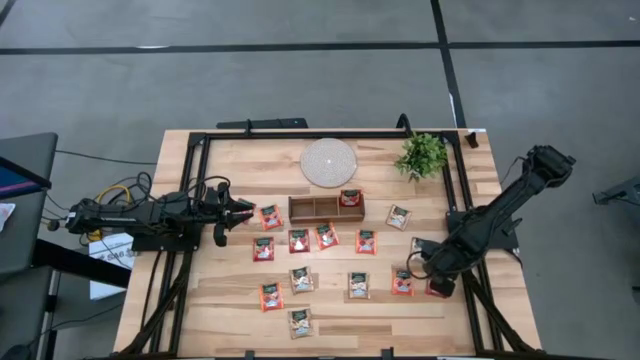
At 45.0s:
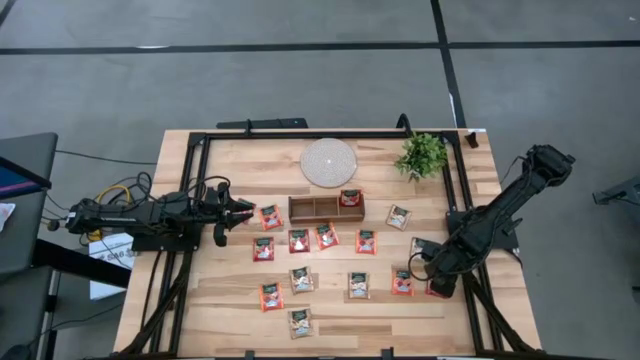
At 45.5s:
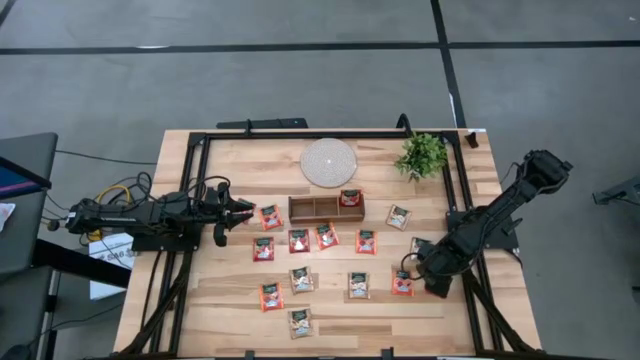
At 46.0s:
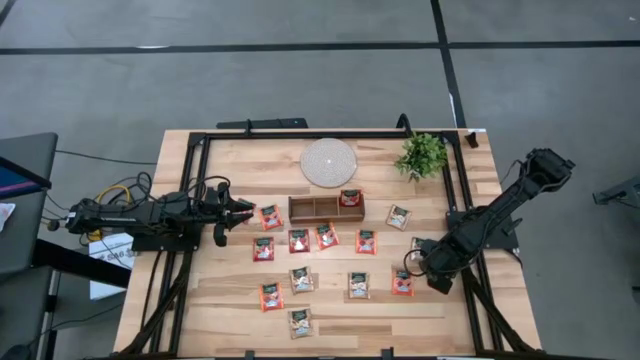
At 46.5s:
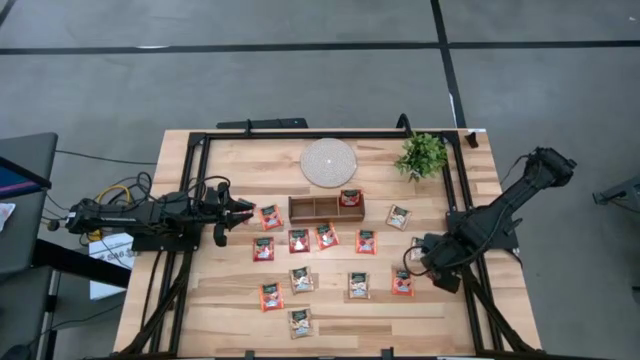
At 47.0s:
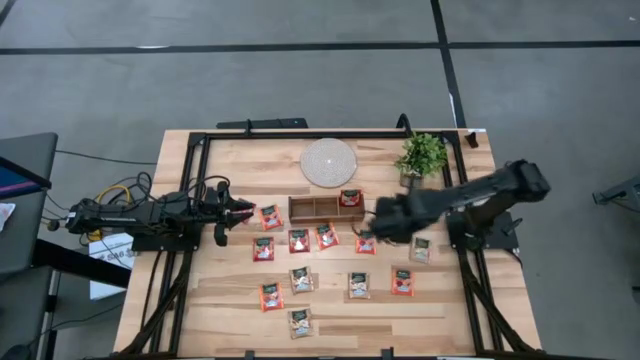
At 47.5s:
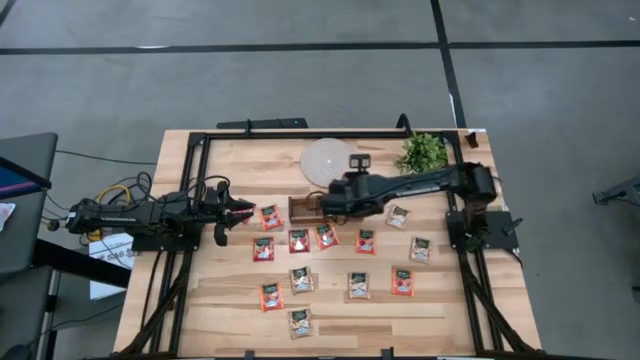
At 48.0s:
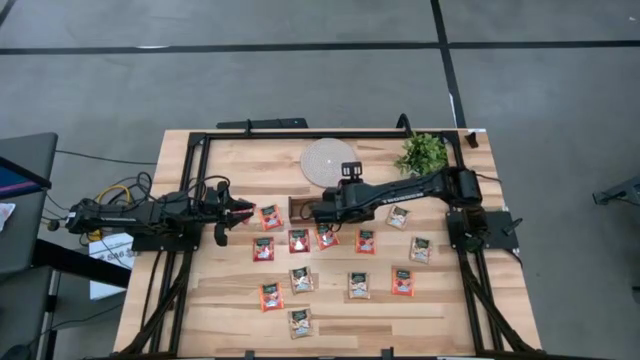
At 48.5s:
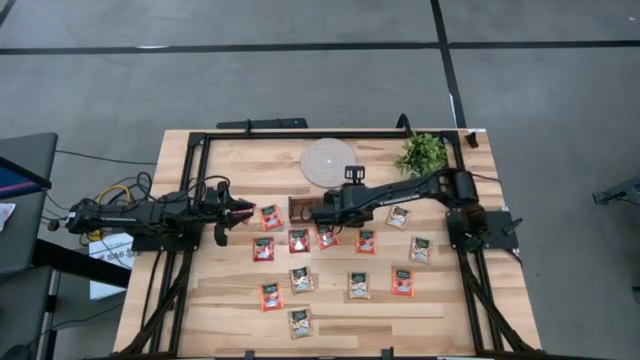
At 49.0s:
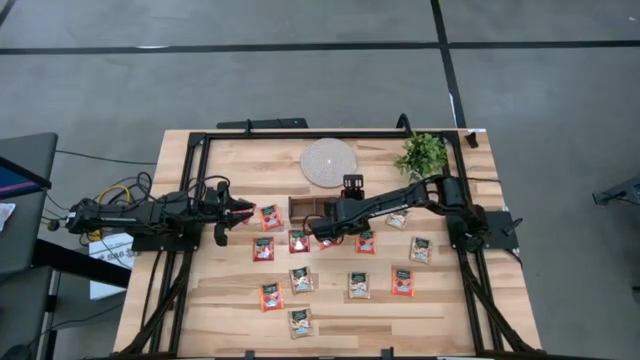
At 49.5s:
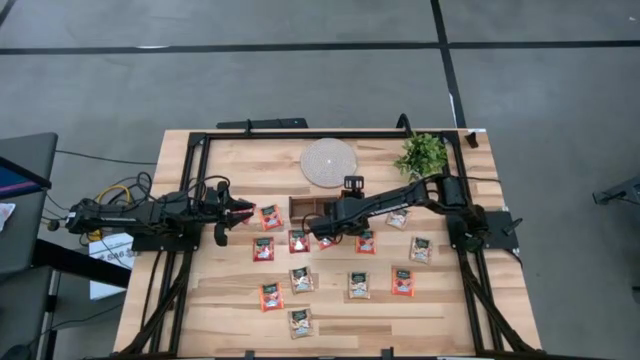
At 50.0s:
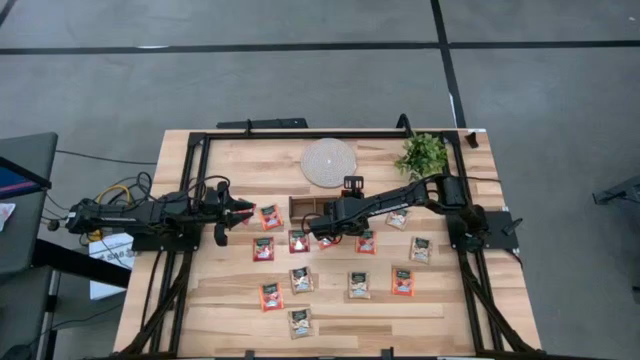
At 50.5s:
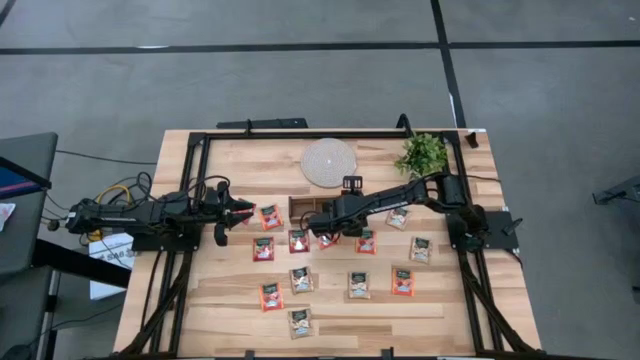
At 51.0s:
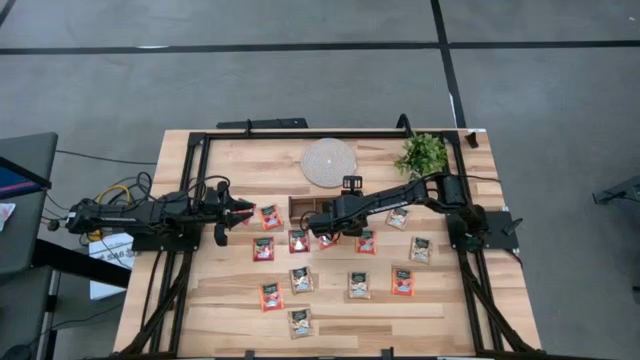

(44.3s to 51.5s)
Task: Pick & Place Tea
Put the red tea bag into the right slot of the wooden organizer

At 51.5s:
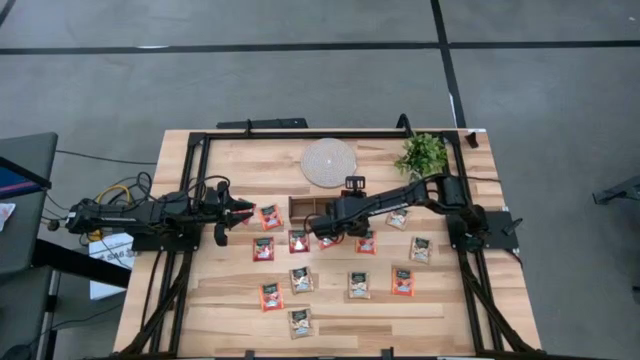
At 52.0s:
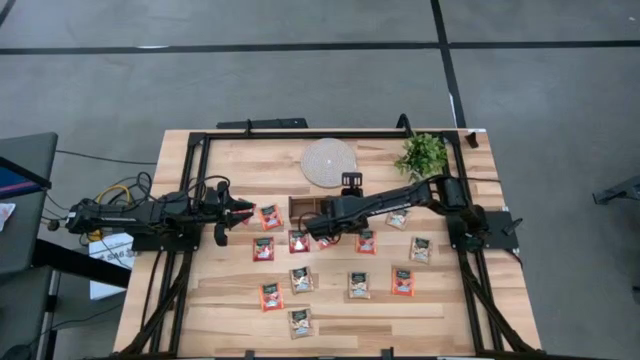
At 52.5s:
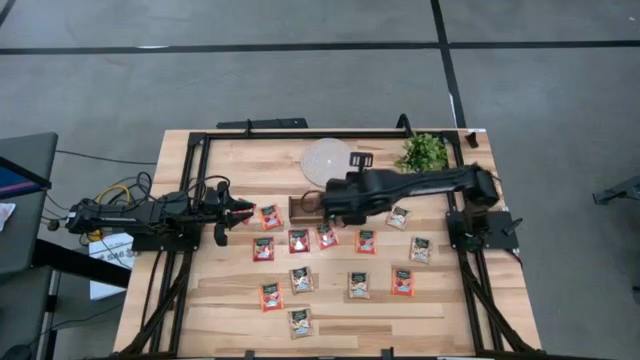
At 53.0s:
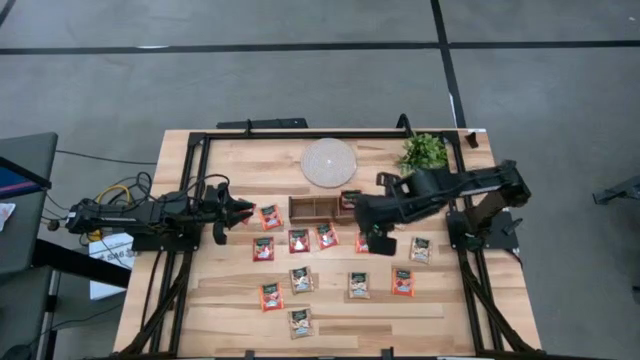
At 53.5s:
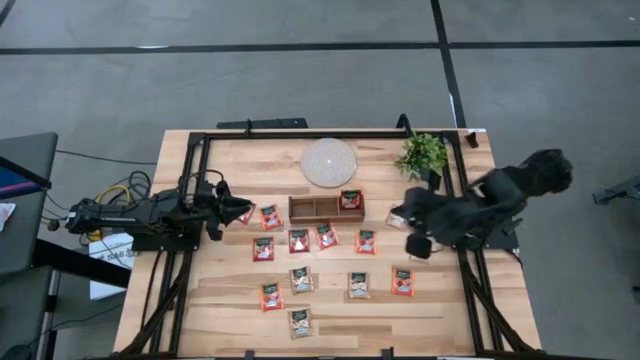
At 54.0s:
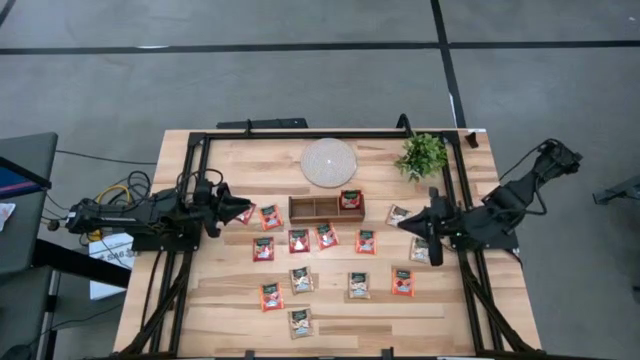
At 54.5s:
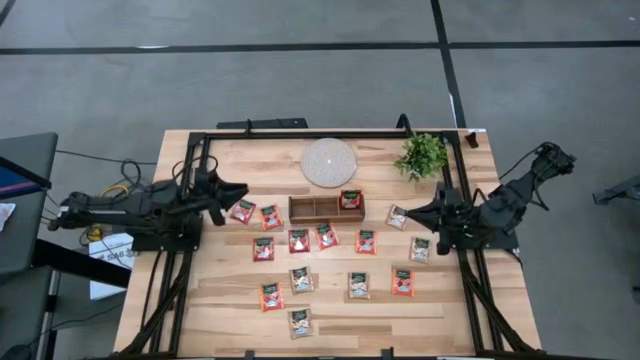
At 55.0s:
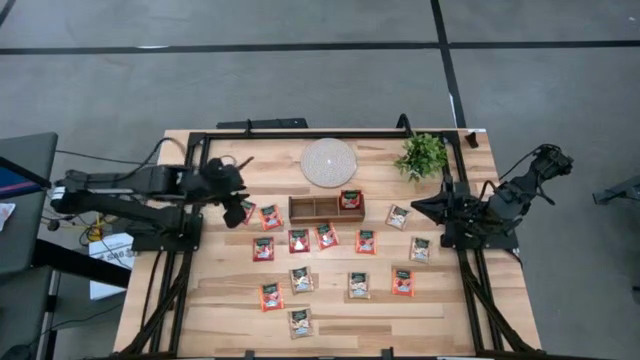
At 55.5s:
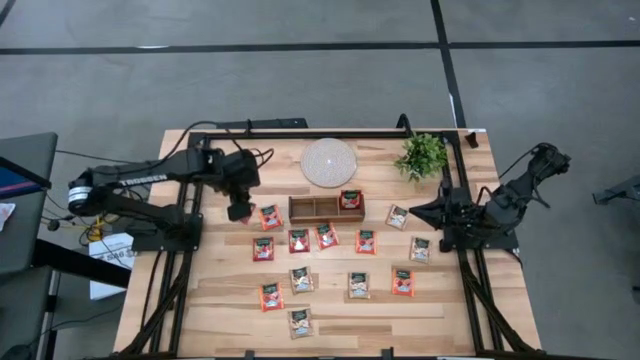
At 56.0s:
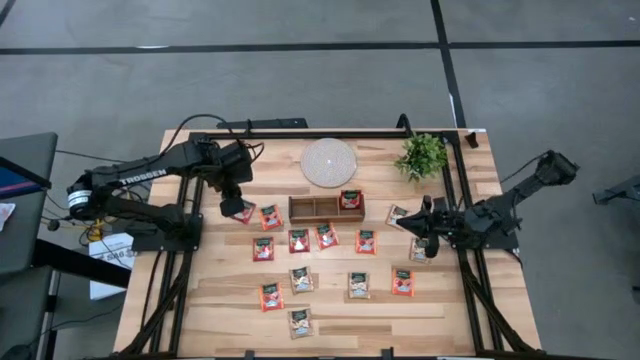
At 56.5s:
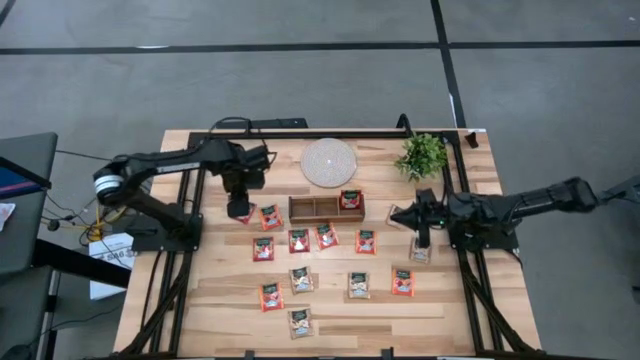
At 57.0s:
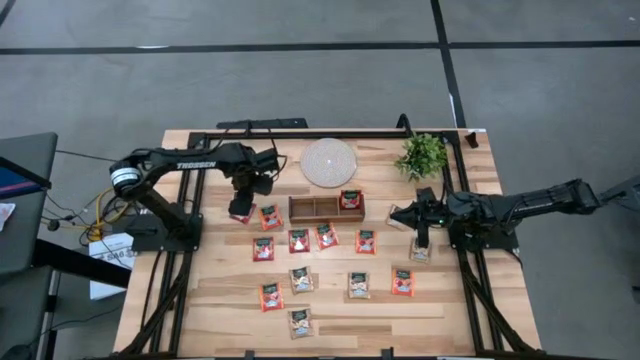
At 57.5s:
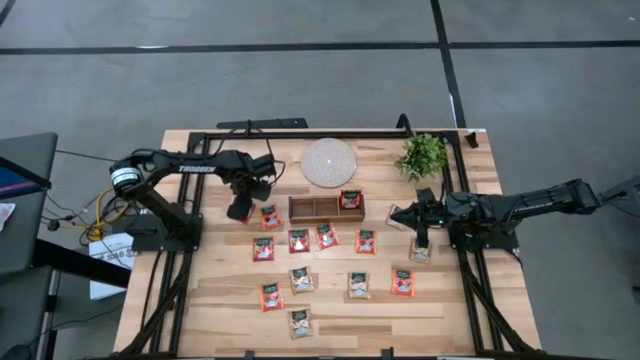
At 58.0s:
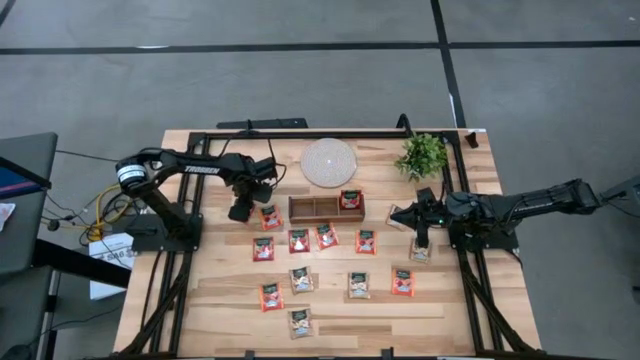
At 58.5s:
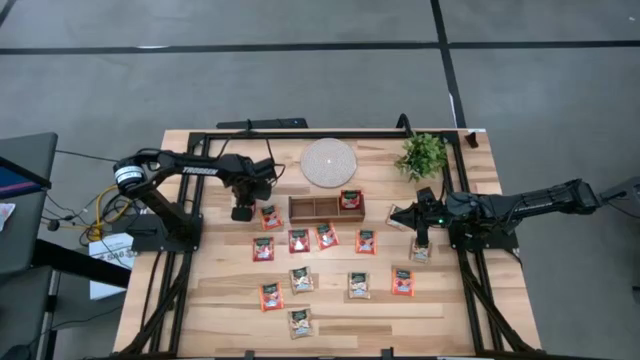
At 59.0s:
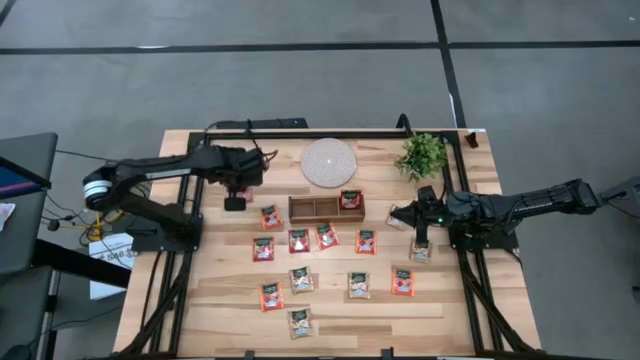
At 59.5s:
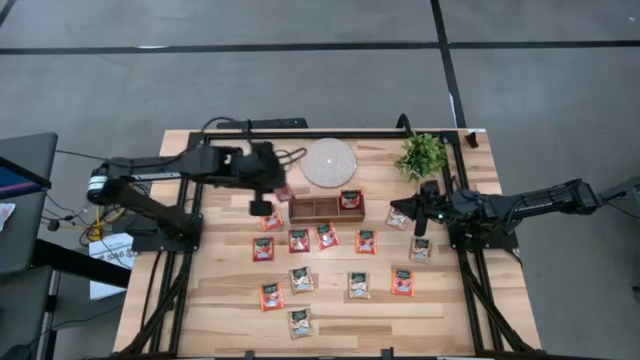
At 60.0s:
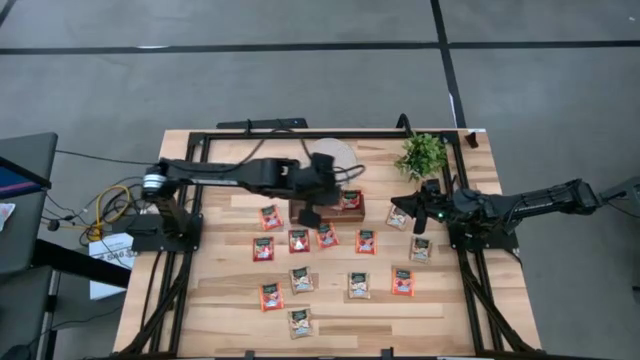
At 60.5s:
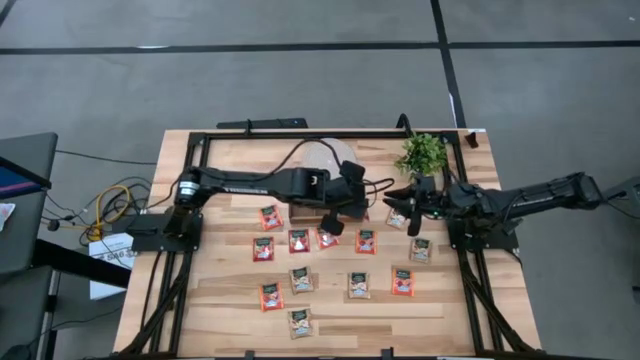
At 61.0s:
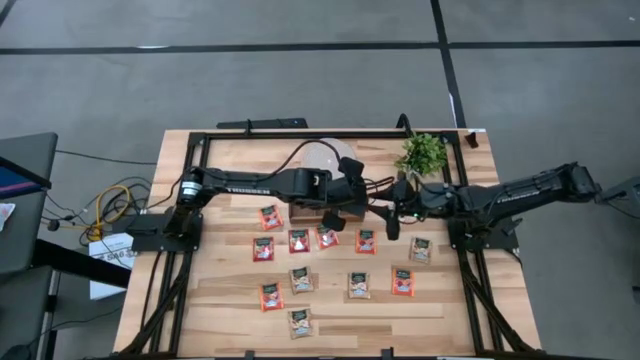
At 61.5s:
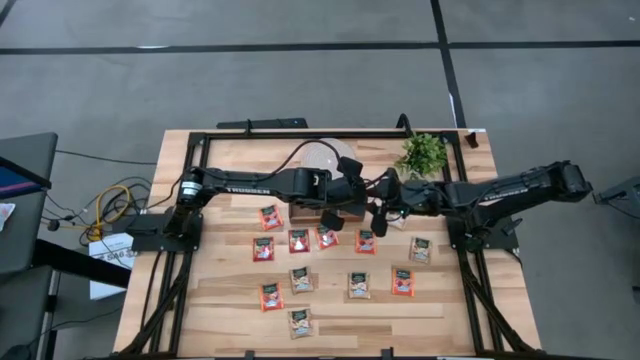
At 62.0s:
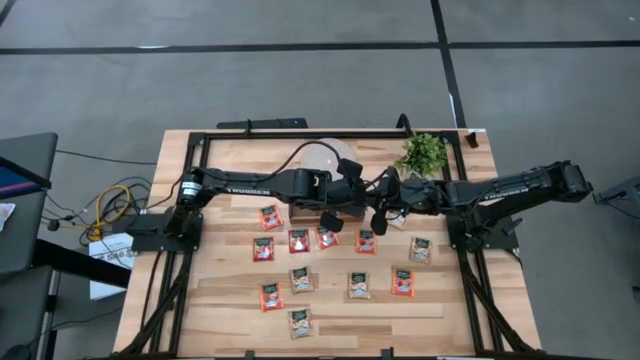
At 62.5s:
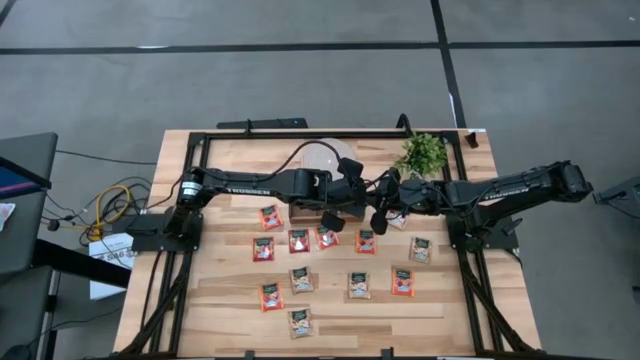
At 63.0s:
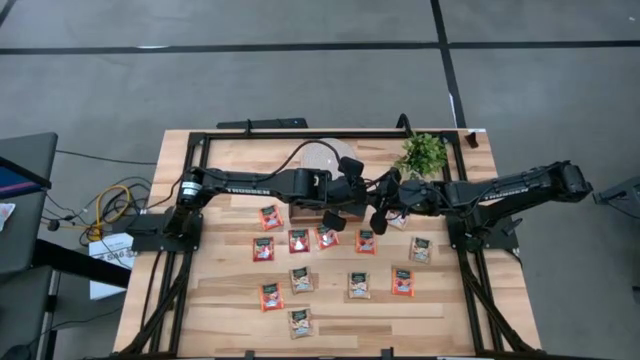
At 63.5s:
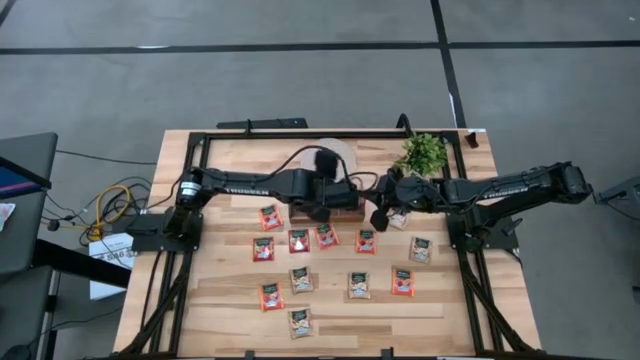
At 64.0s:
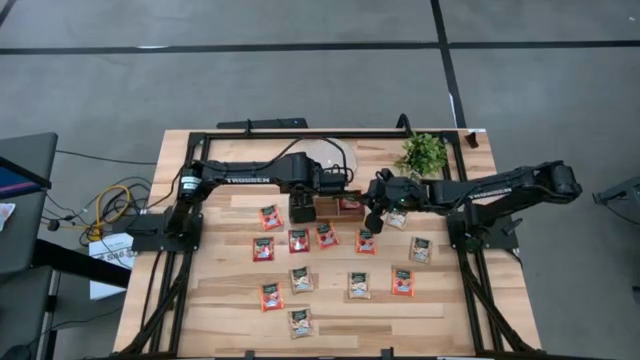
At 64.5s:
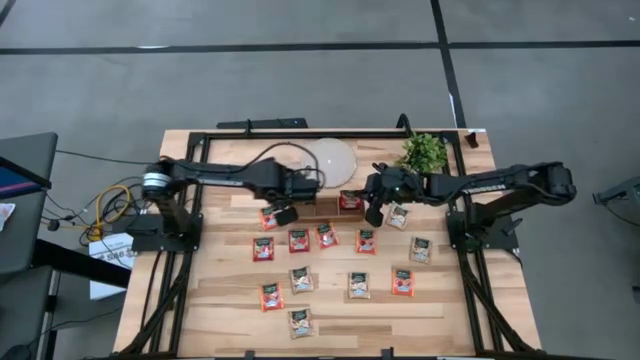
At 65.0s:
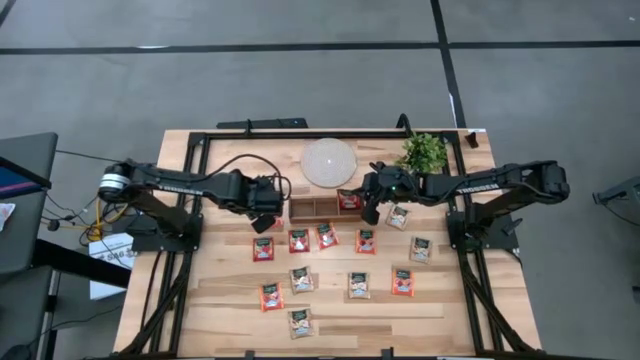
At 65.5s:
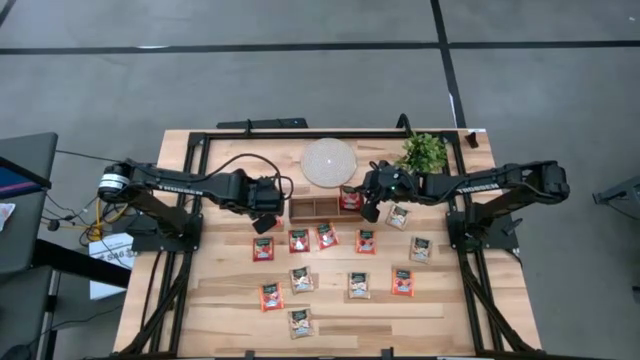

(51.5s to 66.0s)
Put the top red tea bag into the right slot of the wooden organizer

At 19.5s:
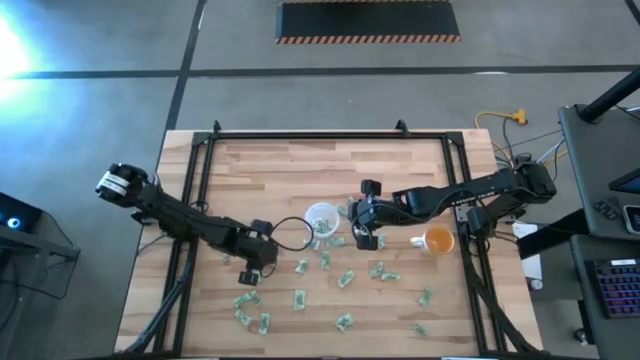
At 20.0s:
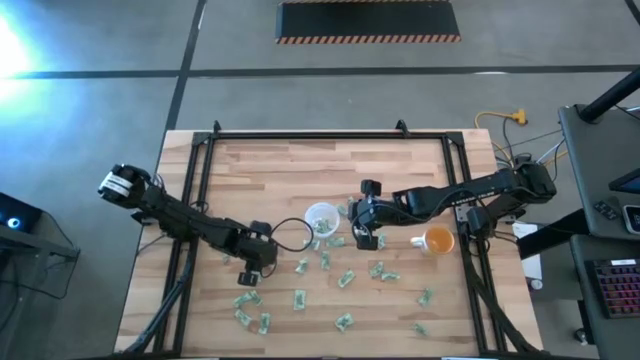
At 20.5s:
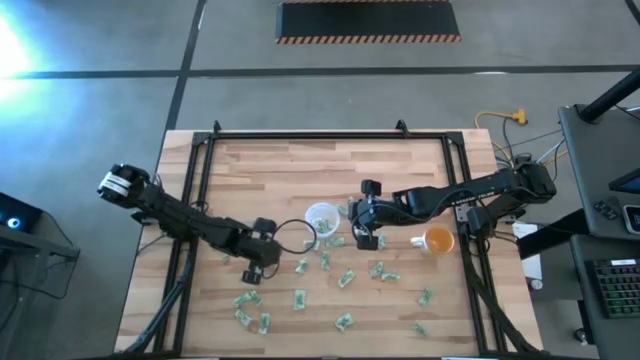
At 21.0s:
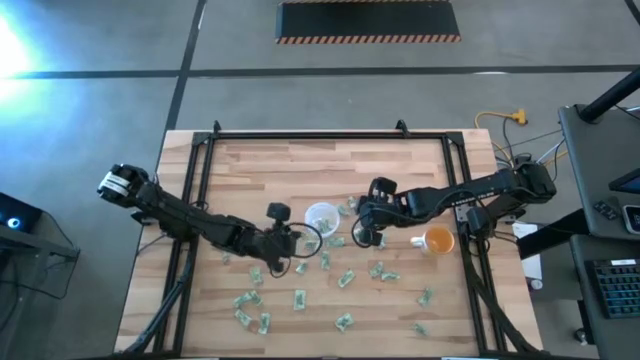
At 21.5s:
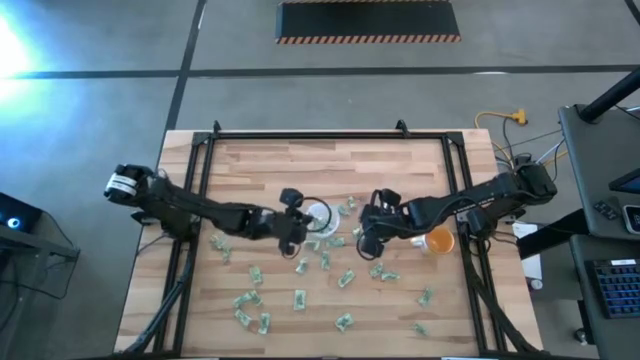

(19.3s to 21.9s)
Task: Pick and place Stevia / Truvia into bins
Put the light green stevia packet into the transparent container
